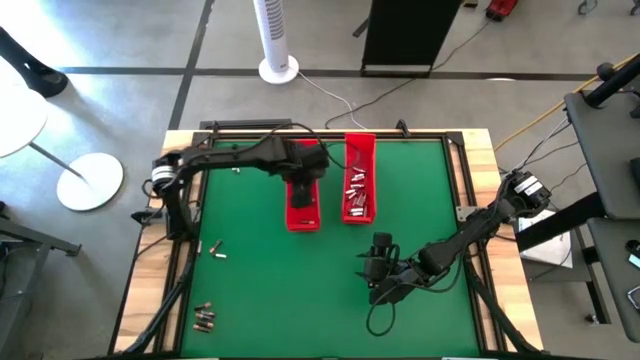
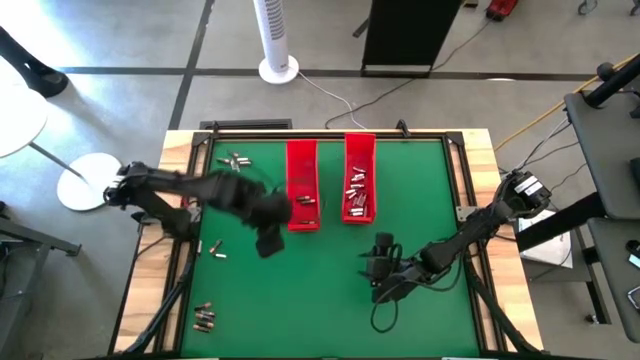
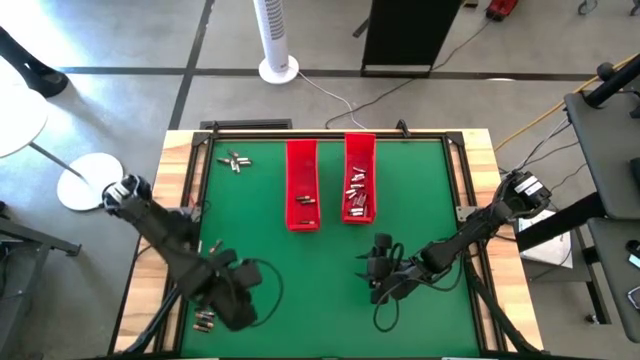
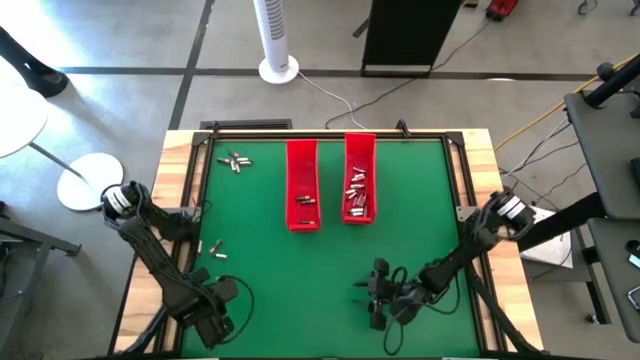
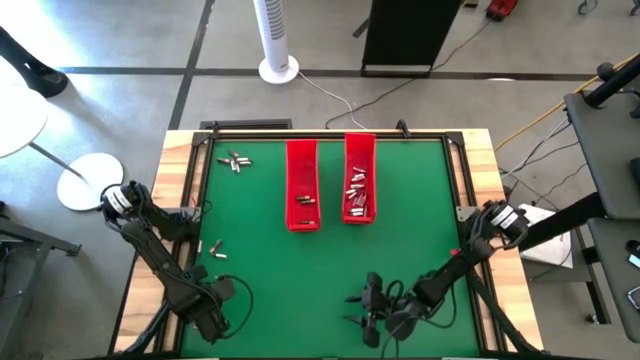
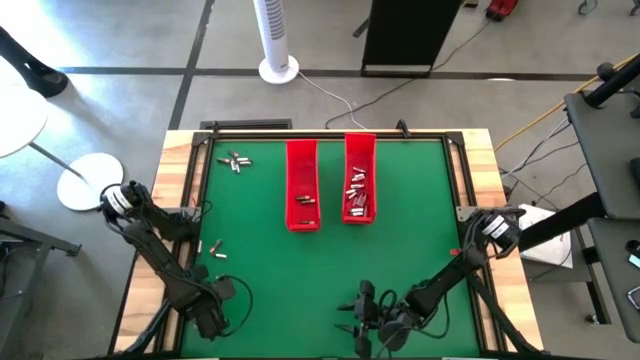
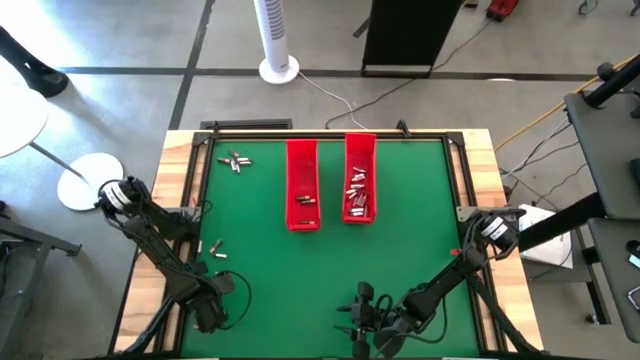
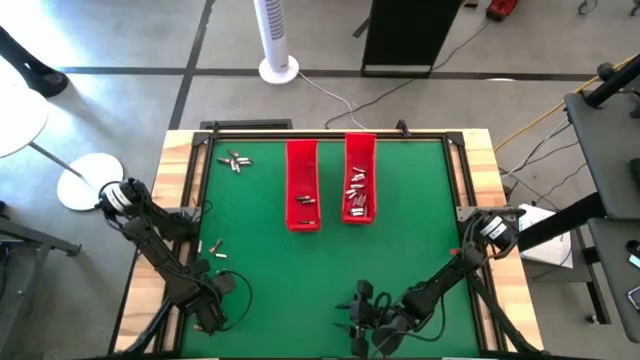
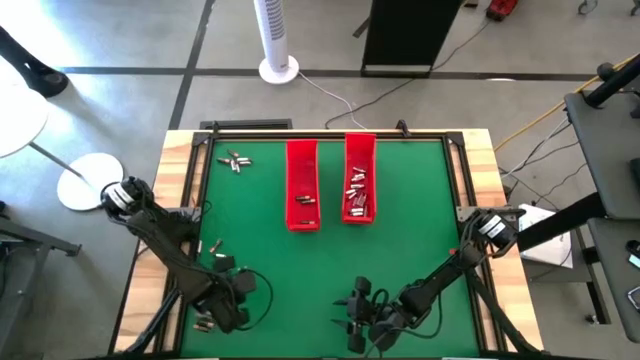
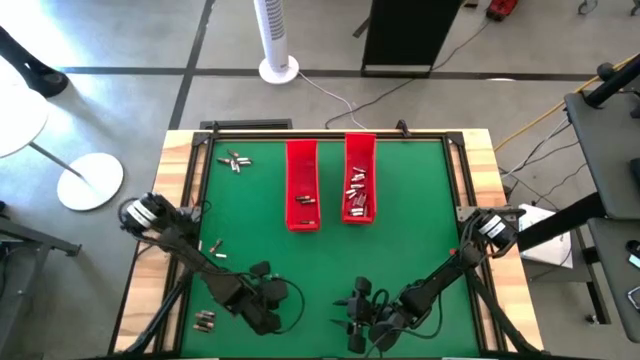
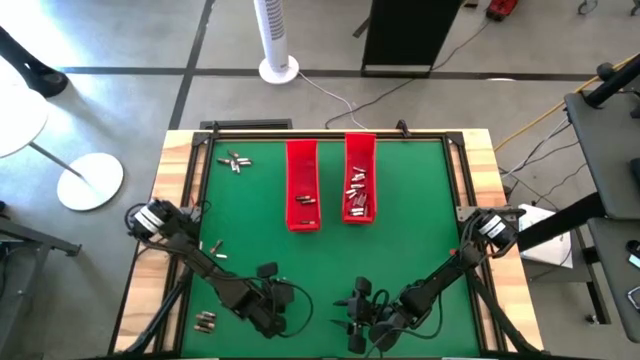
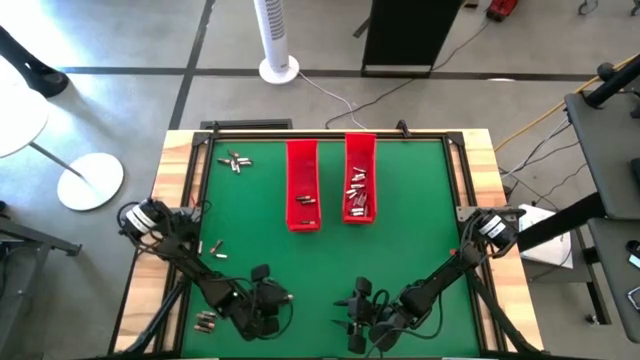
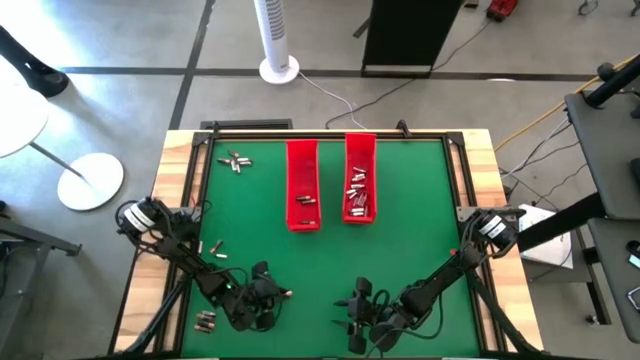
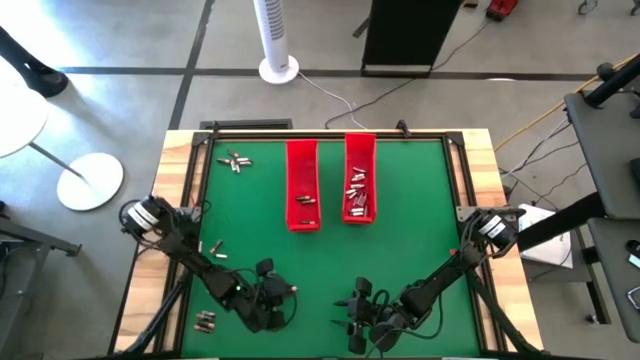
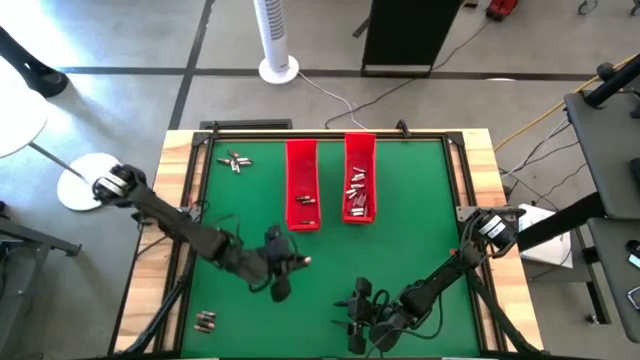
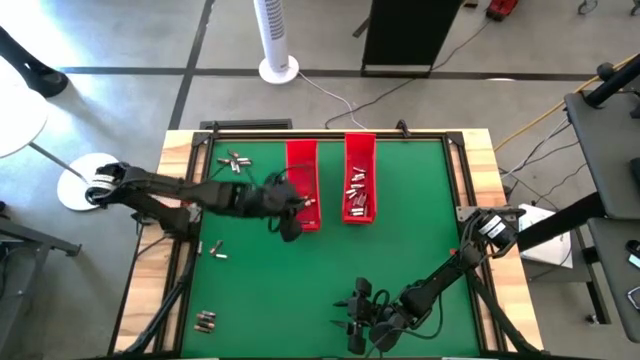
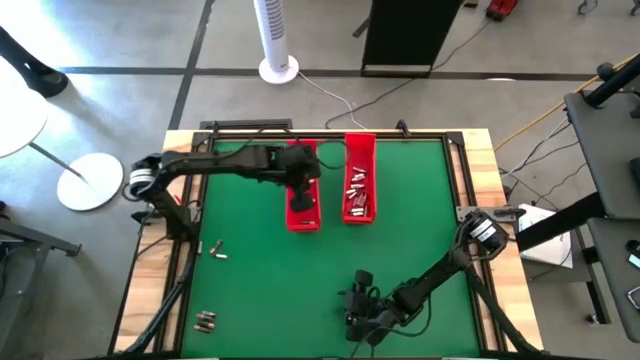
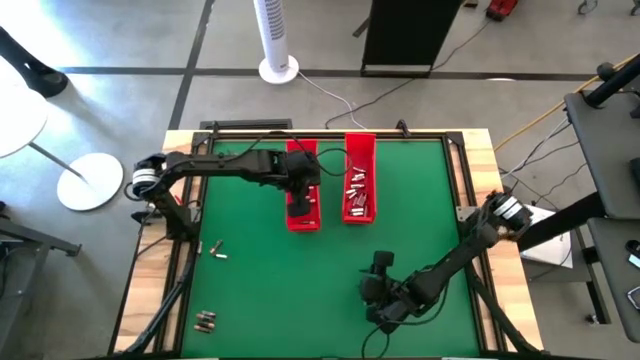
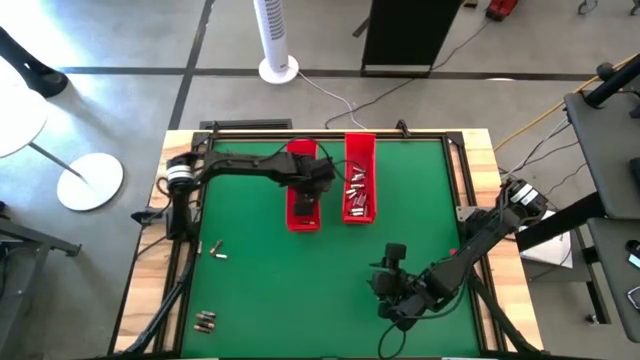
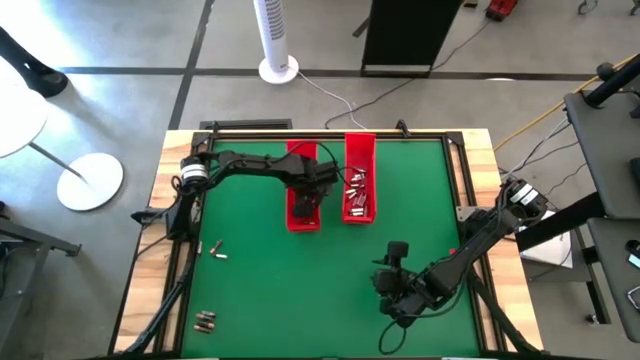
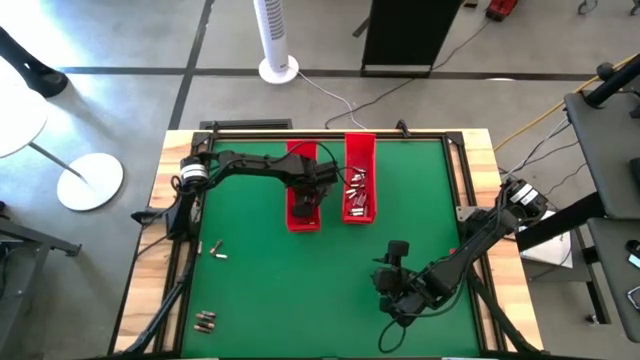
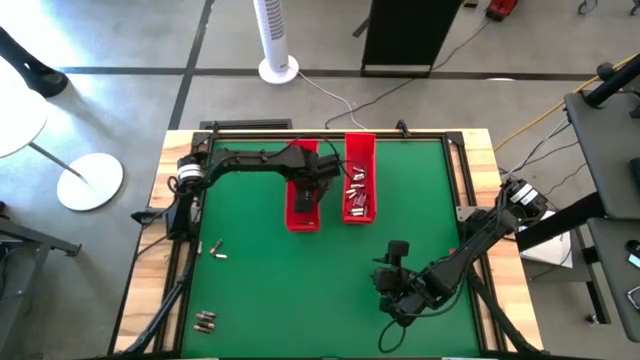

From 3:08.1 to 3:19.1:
Task: Sort batteries
Put the black battery into the left red bin

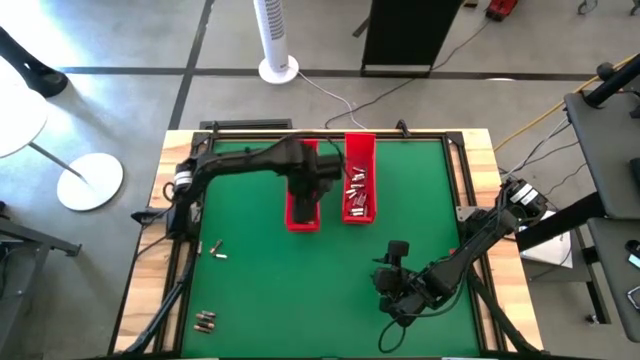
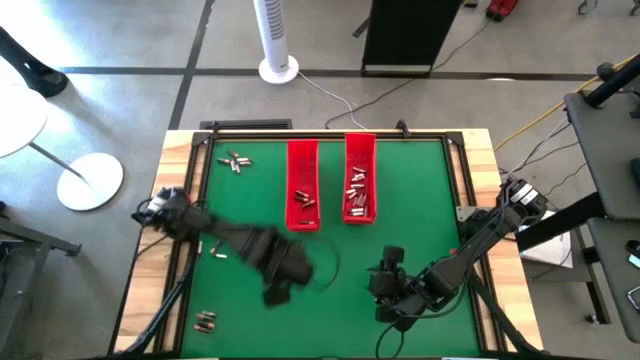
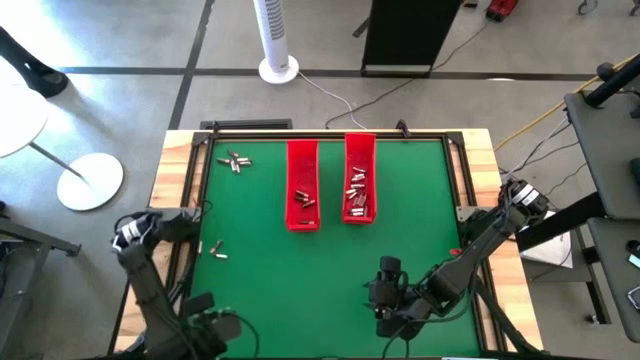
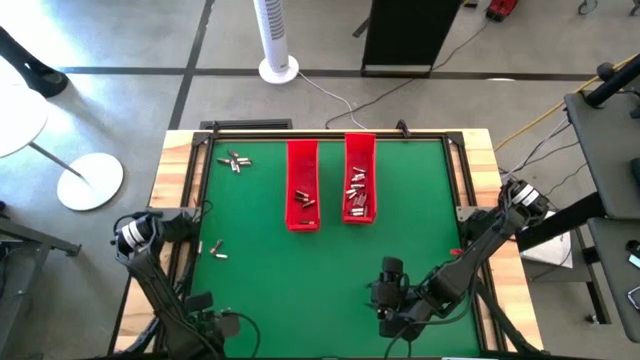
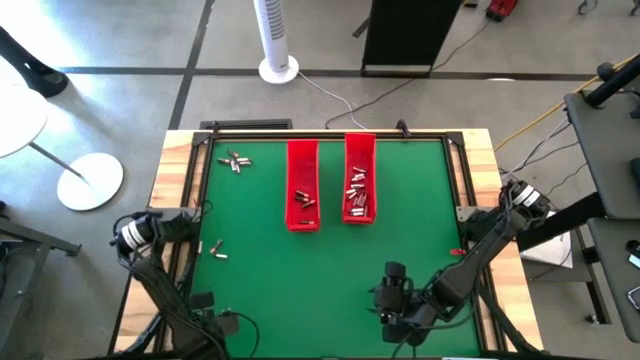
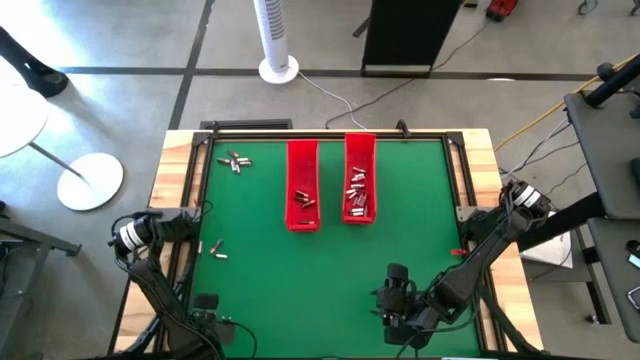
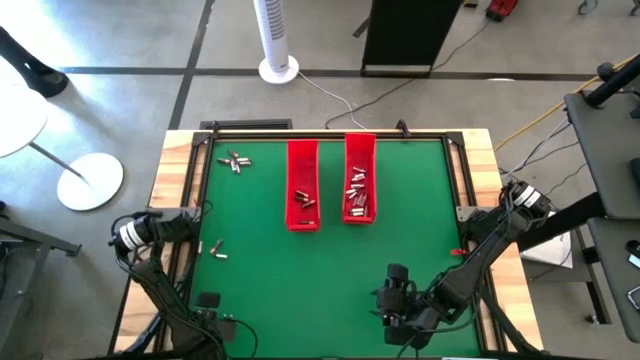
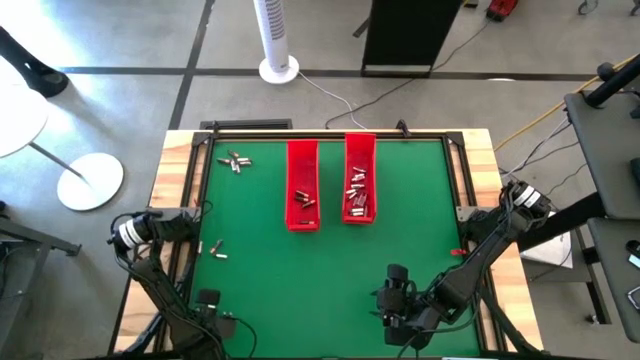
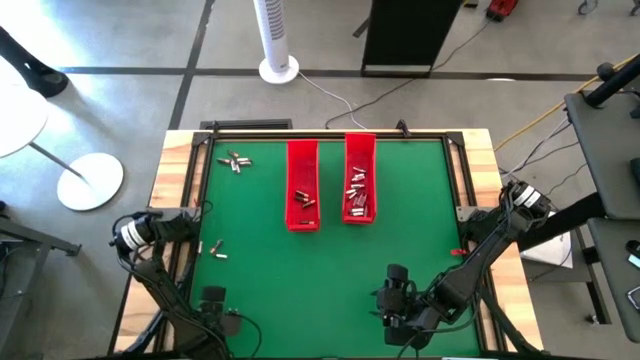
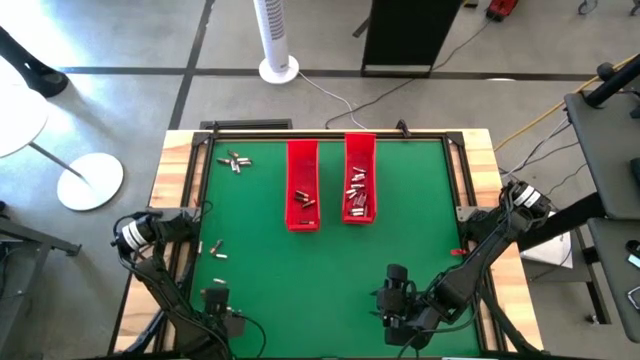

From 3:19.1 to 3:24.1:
Put the silver battery into the right red bin

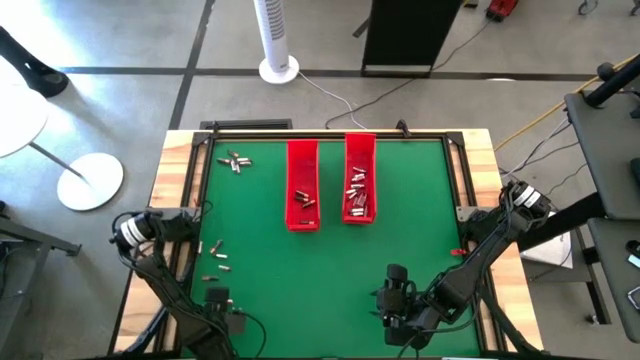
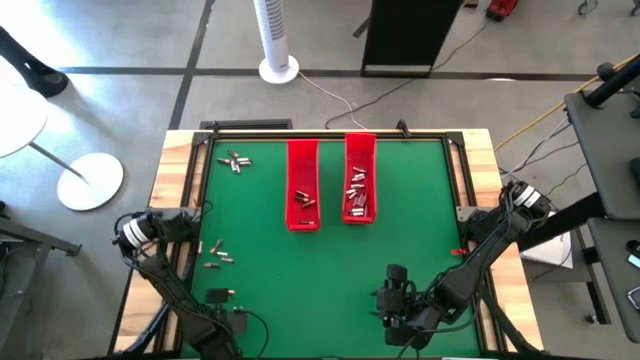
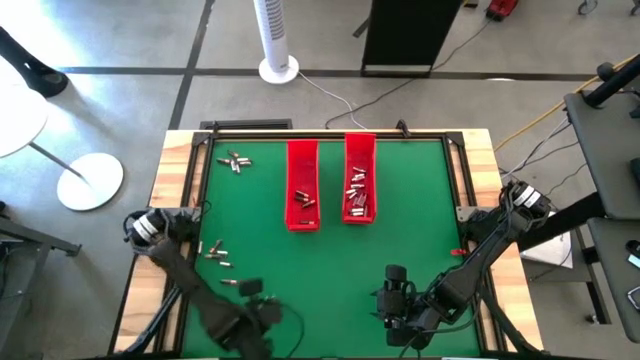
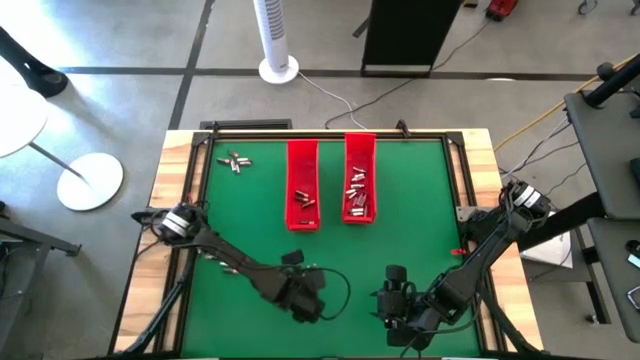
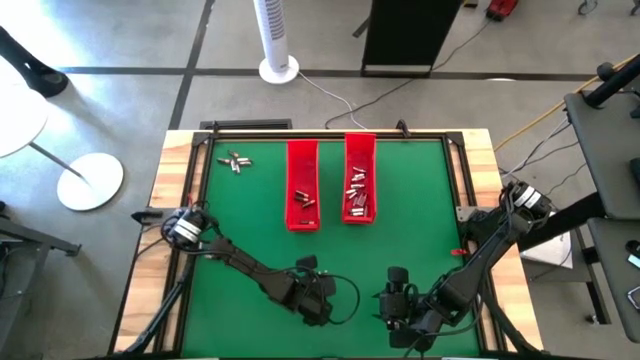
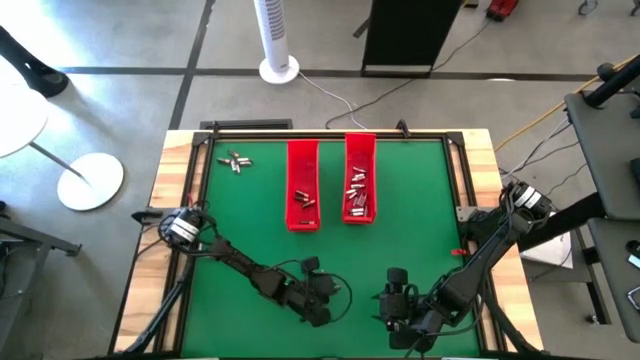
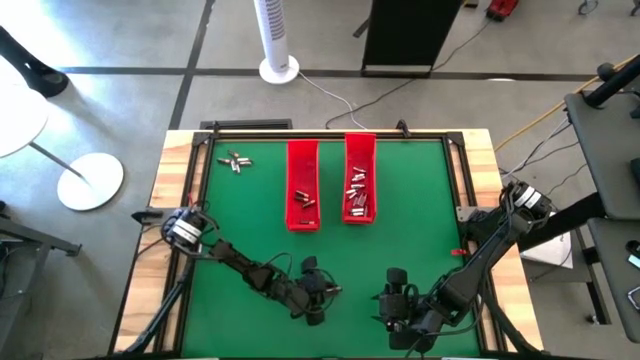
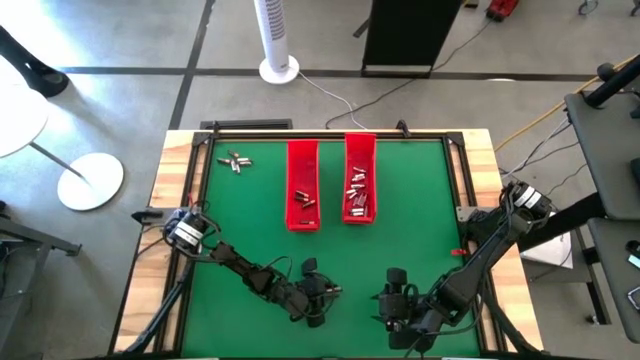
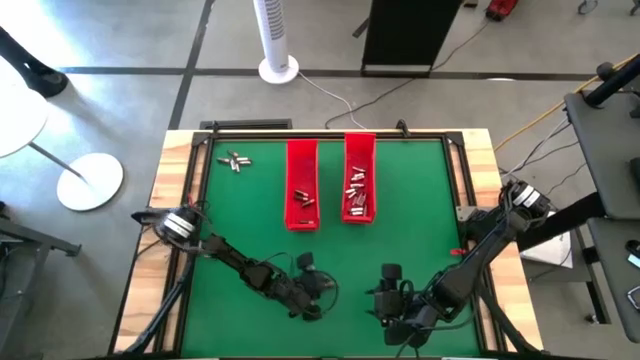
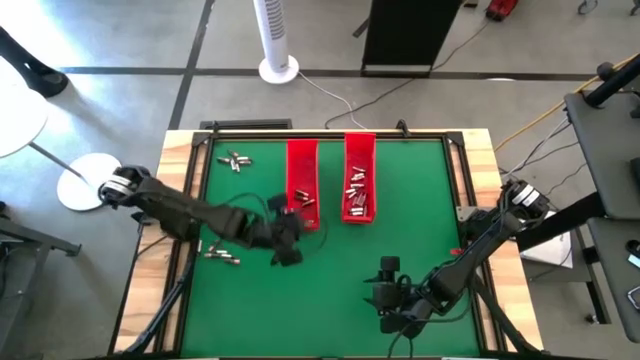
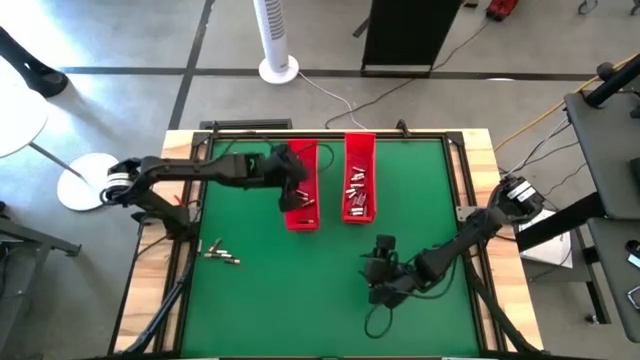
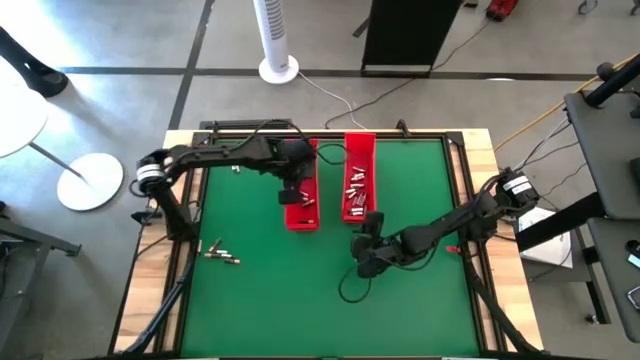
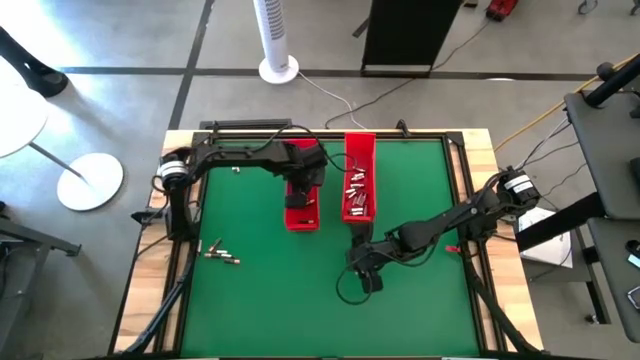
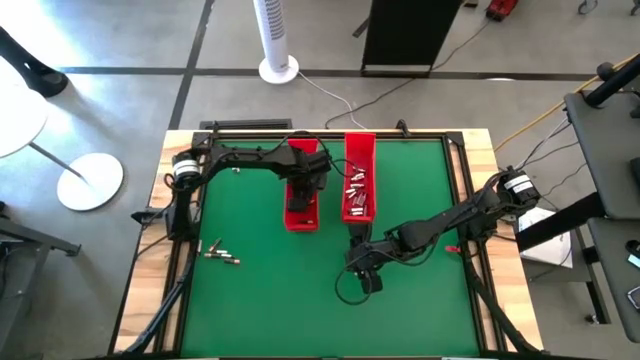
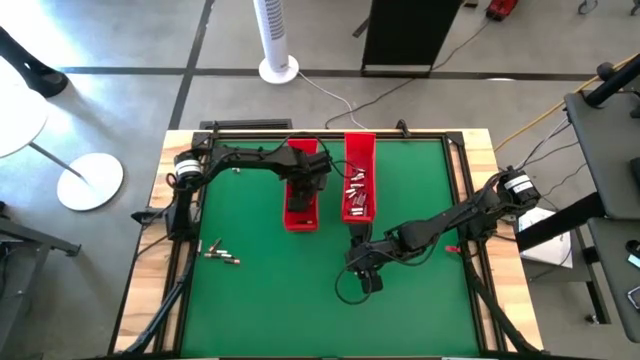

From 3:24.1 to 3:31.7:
Put the black battery into the left red bin
